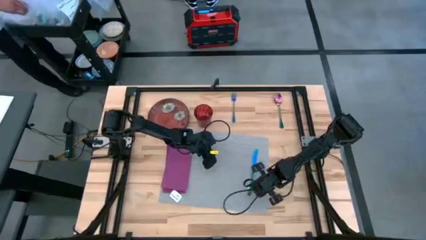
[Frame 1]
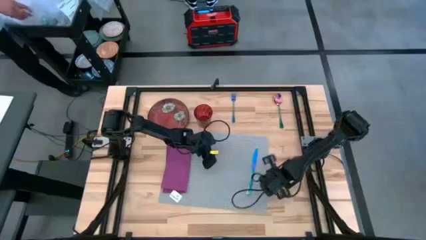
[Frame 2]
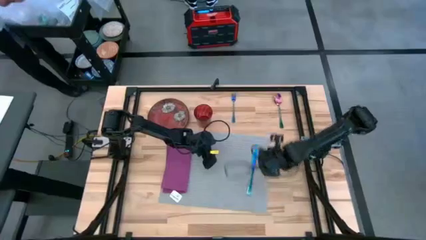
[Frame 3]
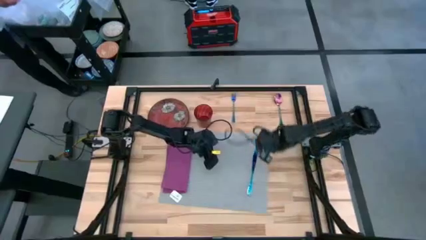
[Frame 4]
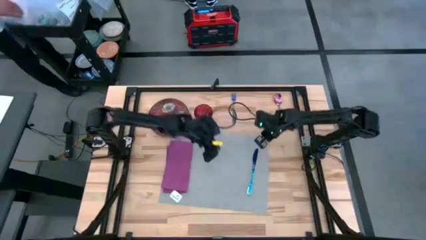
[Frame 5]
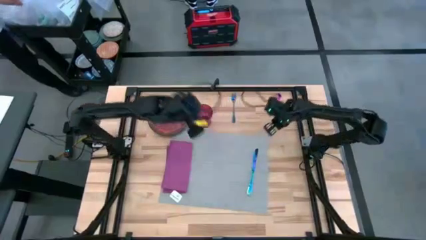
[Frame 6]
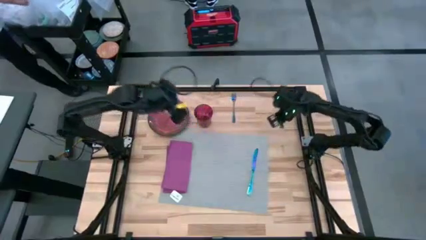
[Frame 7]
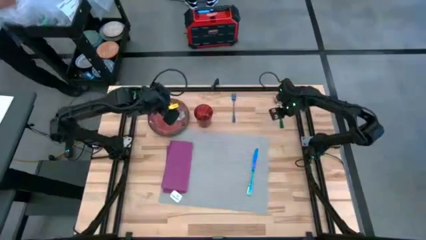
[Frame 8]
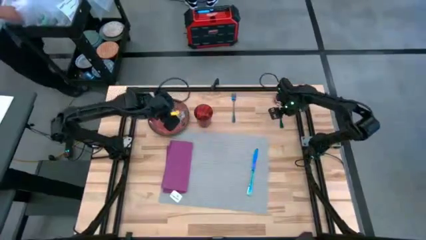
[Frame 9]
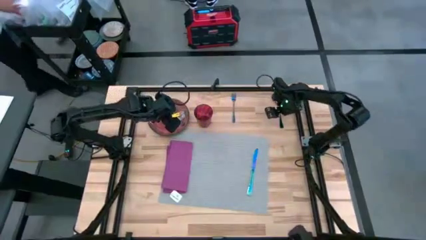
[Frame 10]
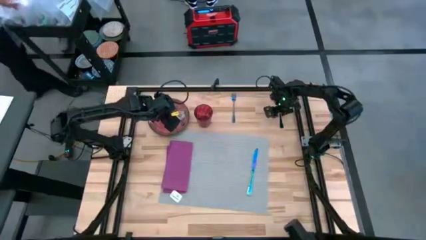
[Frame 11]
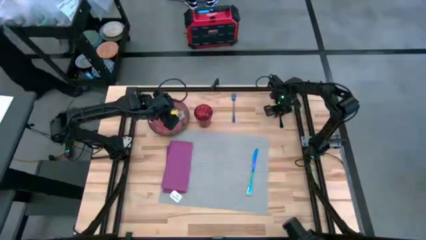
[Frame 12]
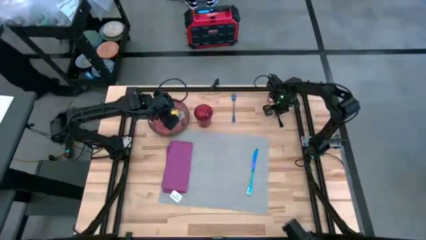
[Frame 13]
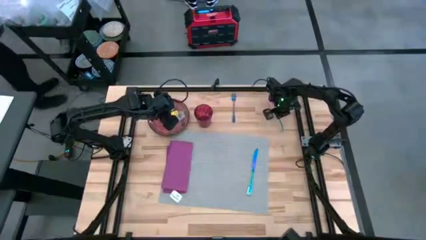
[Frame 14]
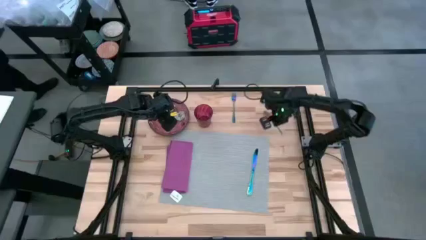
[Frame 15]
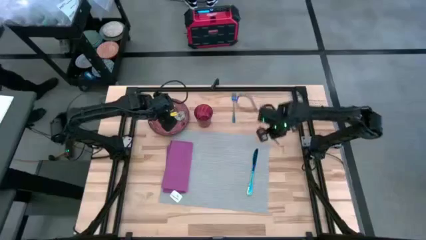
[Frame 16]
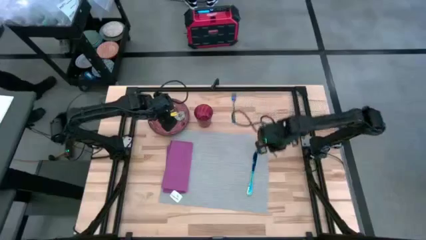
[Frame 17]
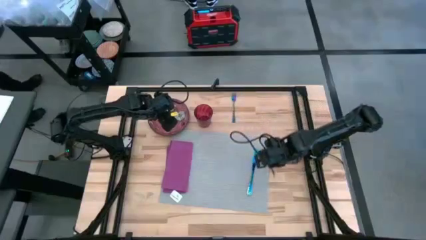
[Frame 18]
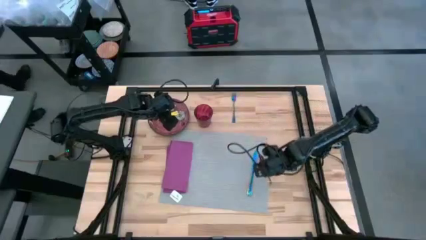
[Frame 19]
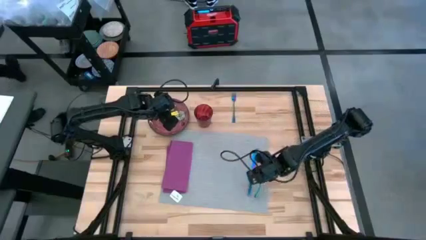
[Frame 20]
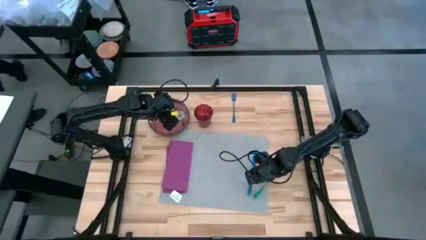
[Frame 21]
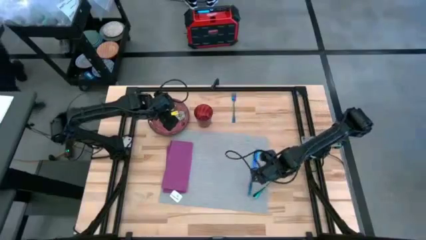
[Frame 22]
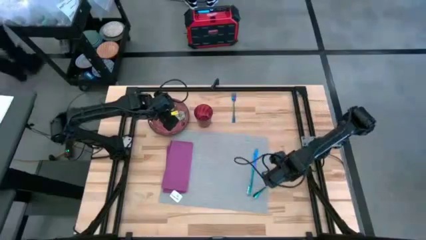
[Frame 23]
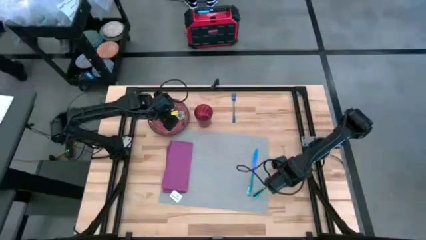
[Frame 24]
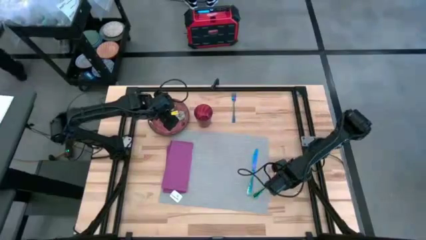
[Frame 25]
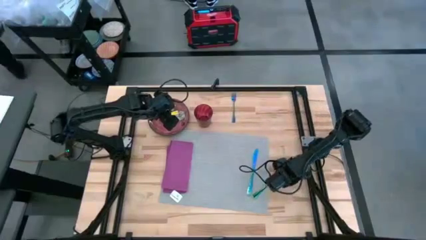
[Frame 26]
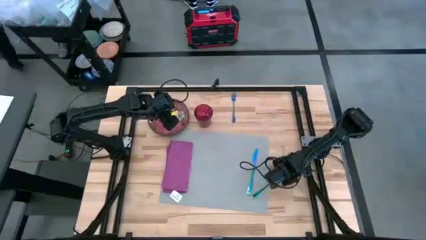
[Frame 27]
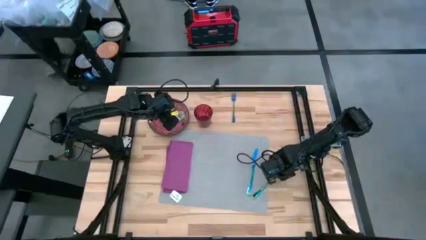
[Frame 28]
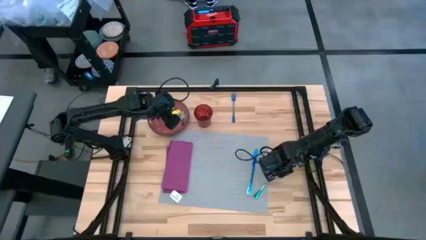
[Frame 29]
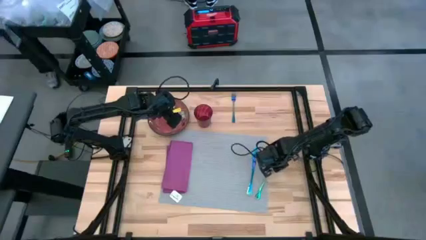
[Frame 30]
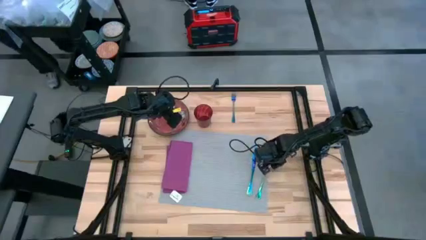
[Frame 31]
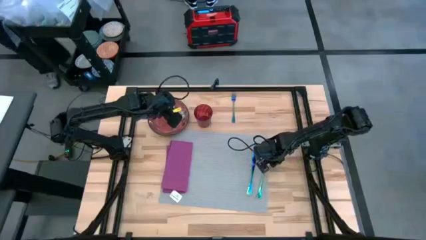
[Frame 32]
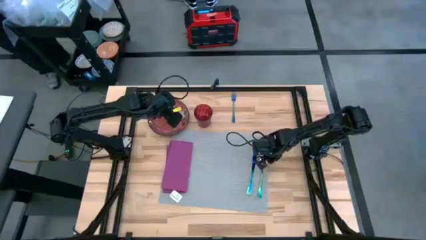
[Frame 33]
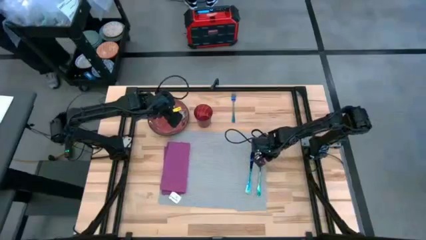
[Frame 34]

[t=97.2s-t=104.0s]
Task: Set table place
Put the blue spoon on the gray place mat beside the blue knife

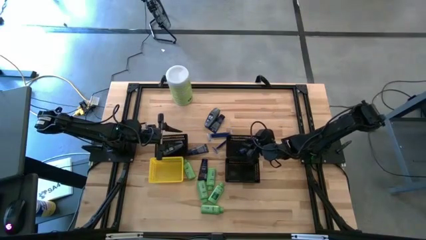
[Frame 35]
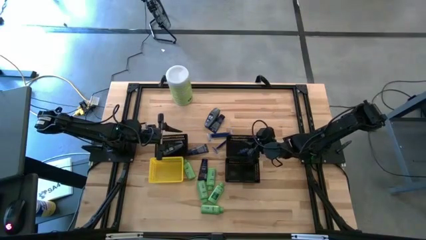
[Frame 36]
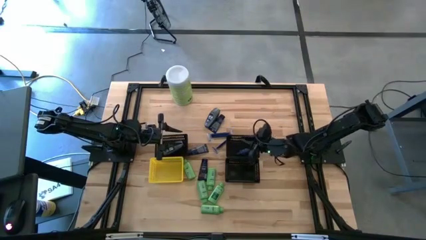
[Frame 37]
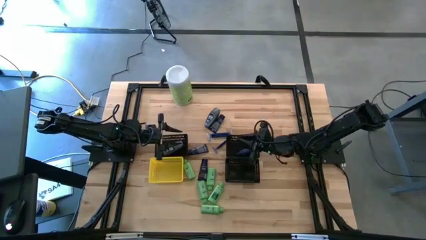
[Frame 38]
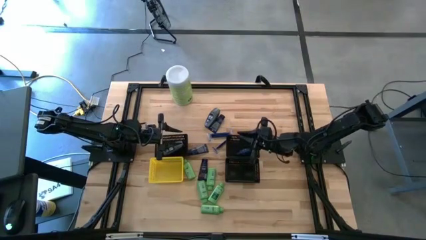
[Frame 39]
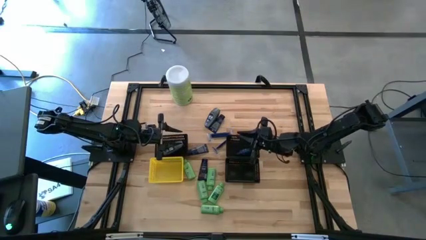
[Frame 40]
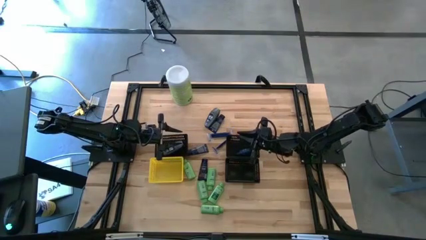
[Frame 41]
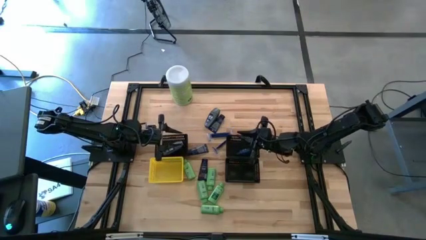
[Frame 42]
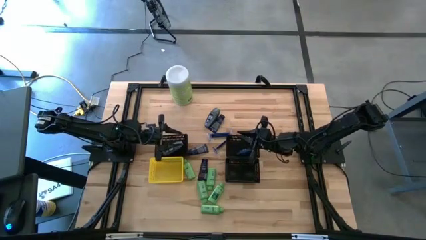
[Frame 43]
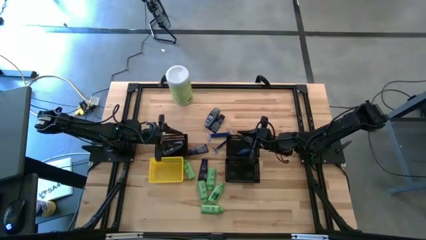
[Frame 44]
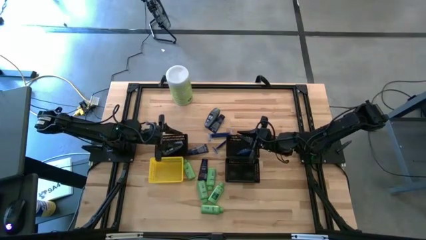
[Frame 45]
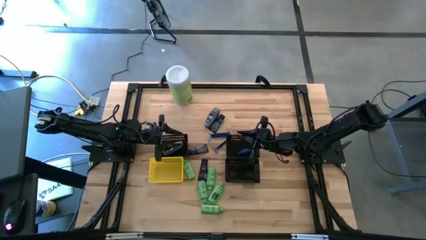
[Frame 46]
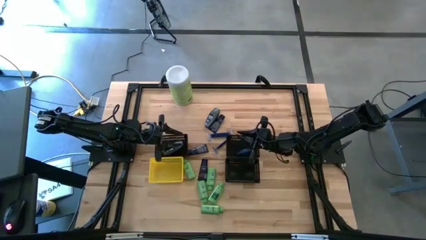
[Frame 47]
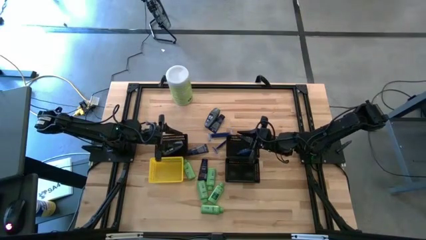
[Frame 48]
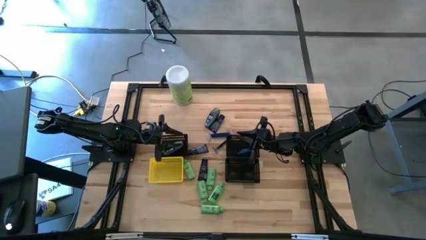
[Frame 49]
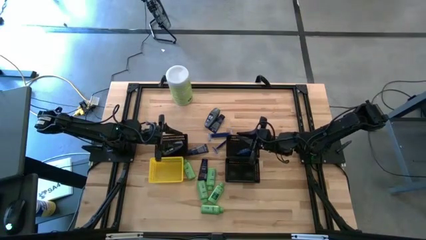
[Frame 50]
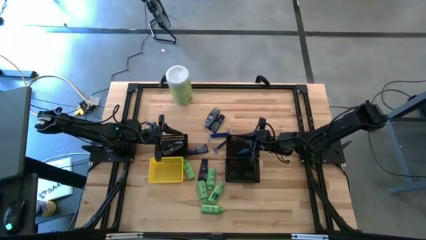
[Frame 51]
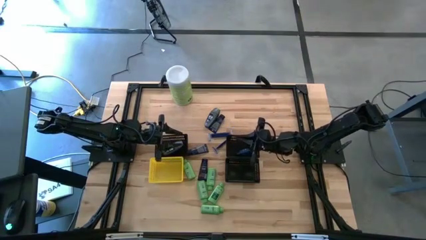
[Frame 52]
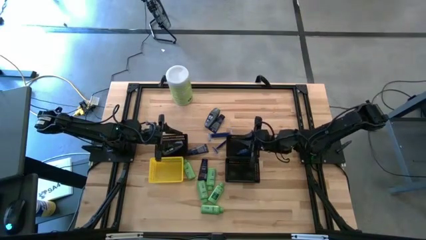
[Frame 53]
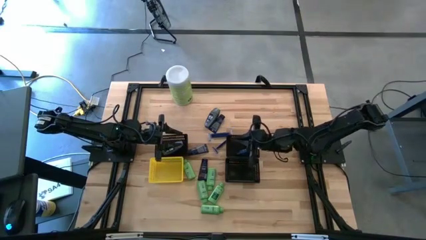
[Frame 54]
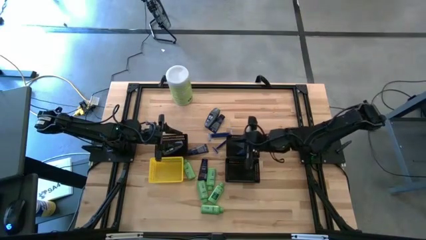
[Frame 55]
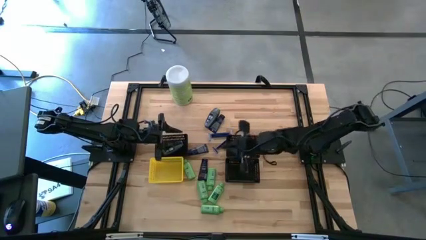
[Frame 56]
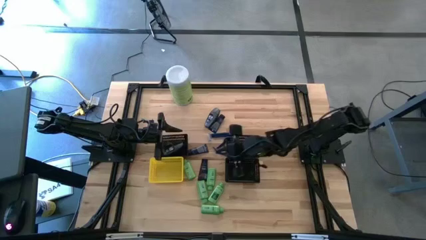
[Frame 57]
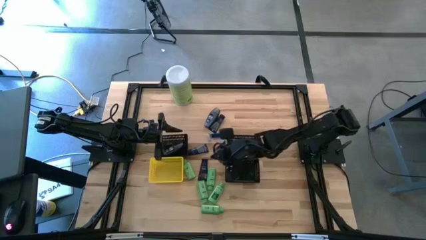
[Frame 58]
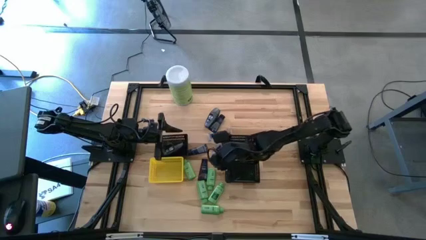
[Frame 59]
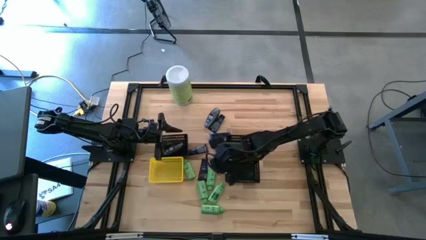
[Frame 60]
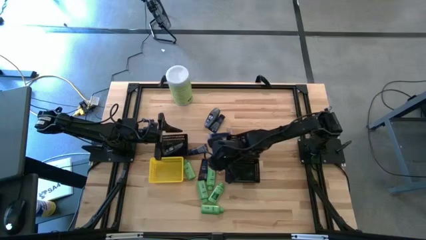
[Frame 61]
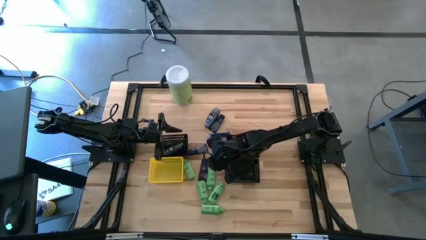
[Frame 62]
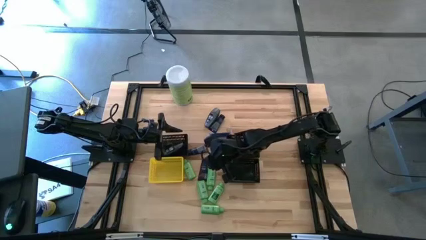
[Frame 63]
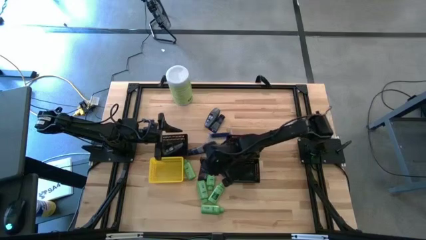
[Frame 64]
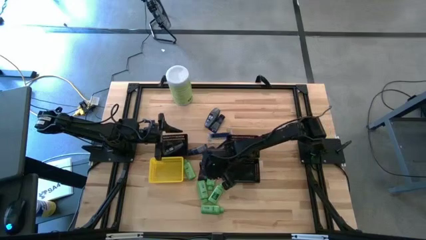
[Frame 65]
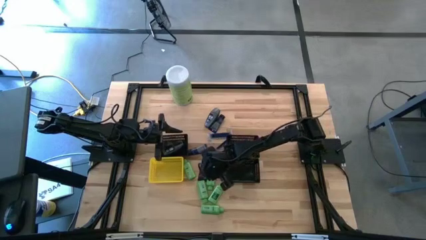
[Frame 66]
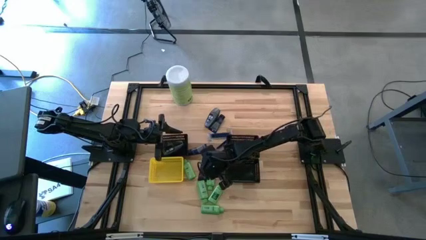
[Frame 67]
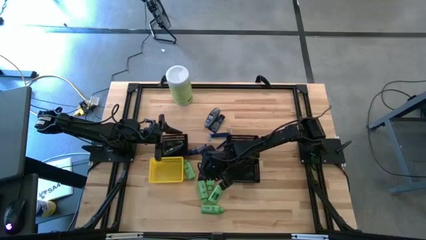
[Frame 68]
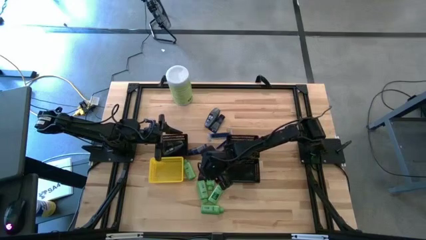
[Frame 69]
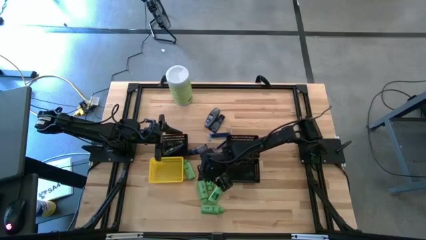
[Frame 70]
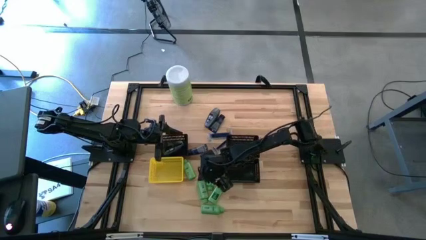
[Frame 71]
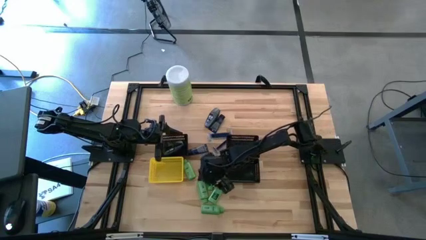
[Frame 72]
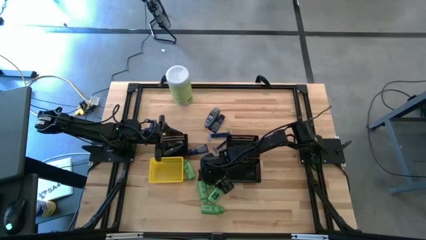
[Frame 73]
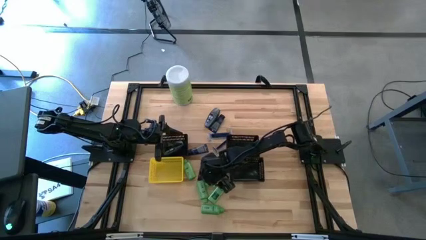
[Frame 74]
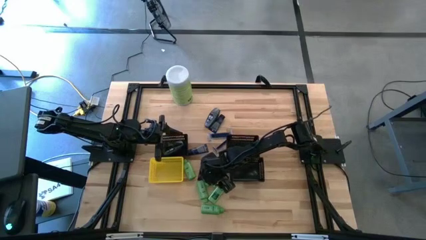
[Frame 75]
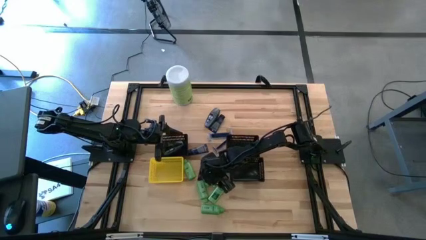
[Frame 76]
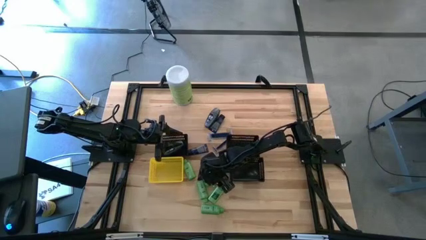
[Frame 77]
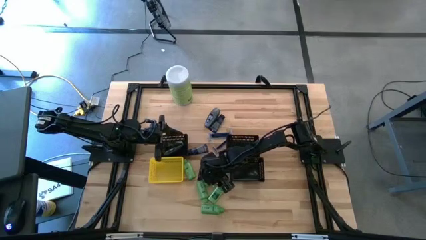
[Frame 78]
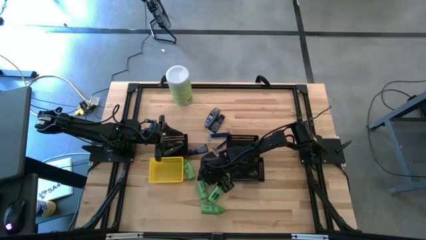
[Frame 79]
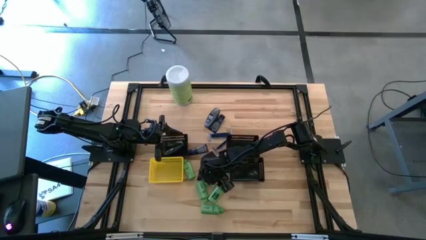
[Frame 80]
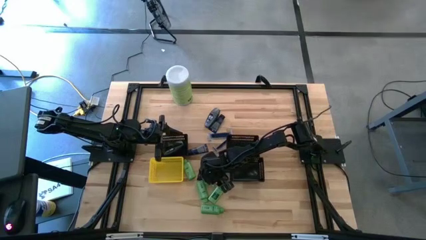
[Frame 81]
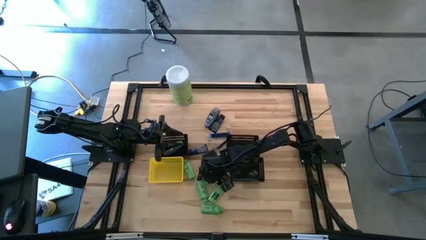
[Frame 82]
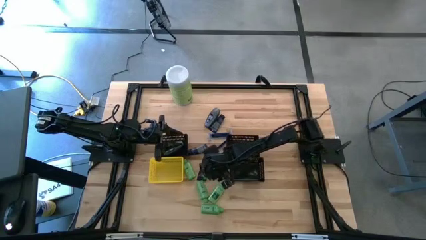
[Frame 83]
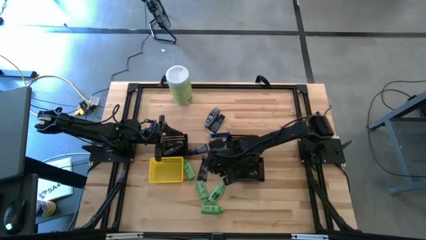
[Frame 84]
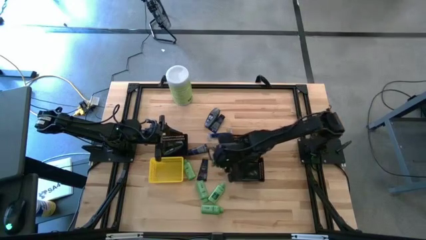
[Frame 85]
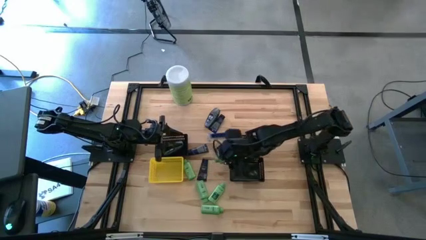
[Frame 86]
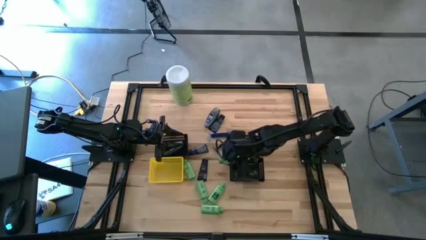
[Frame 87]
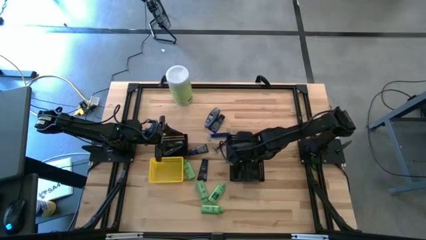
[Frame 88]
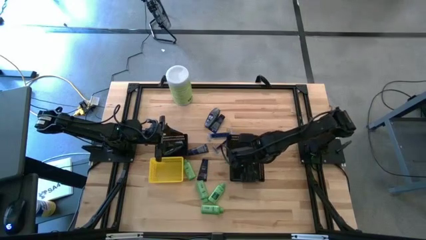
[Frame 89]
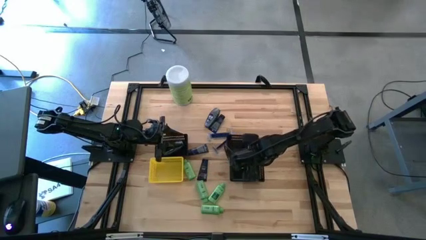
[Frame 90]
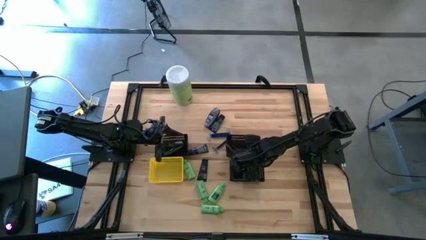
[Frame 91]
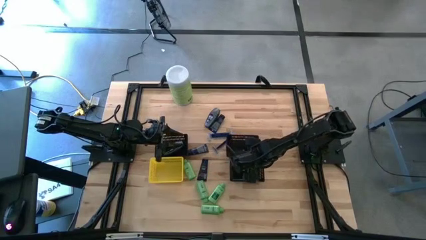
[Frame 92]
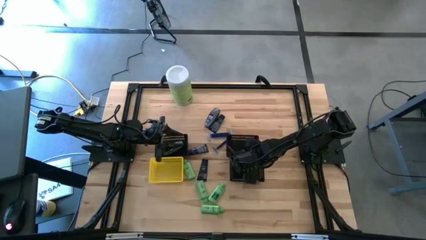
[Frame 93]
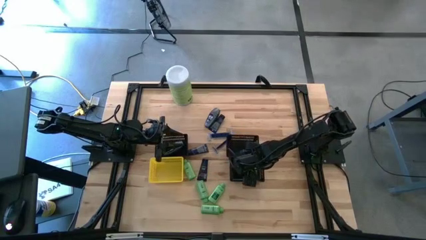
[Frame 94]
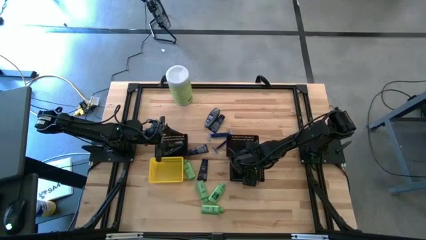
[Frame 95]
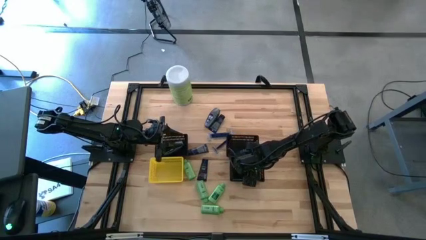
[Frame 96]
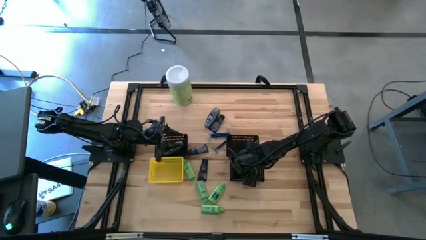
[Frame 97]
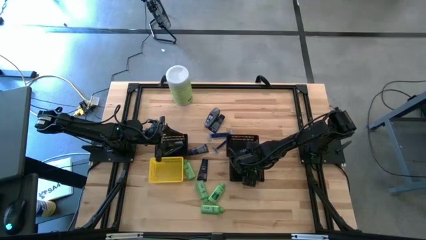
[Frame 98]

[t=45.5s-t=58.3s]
Task: Pick & Place Travel size toiletries
Put the green shampoo into the bottom right black bin
